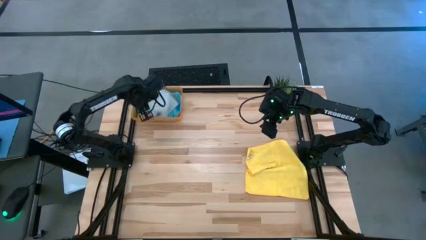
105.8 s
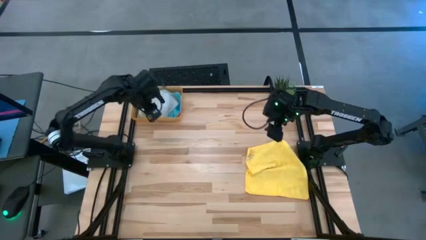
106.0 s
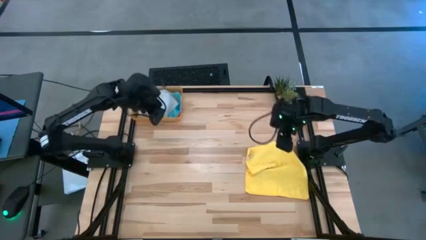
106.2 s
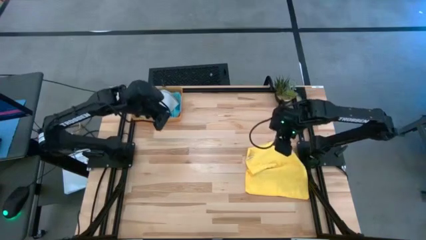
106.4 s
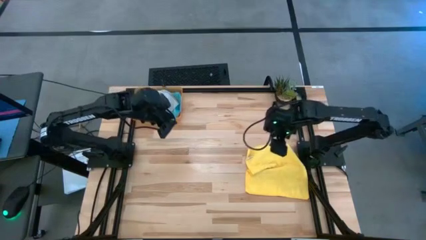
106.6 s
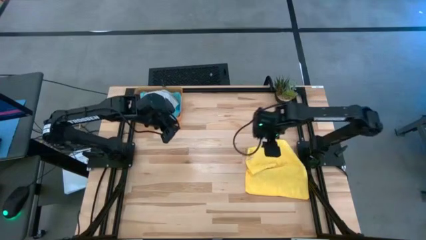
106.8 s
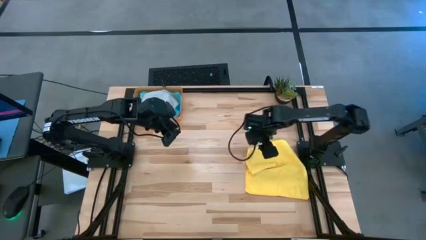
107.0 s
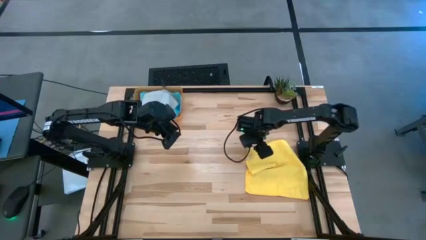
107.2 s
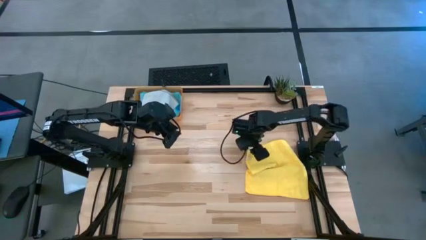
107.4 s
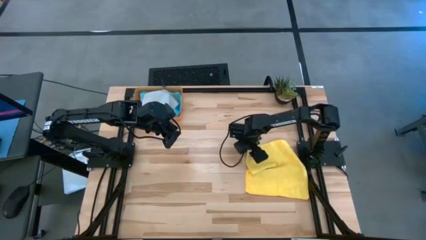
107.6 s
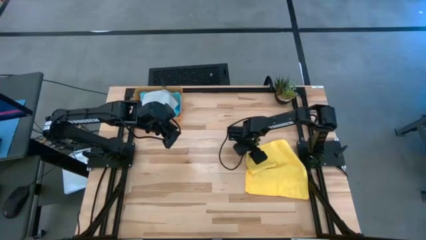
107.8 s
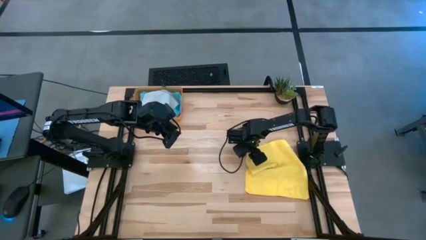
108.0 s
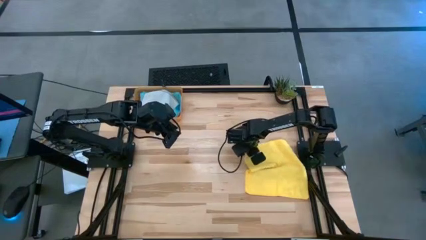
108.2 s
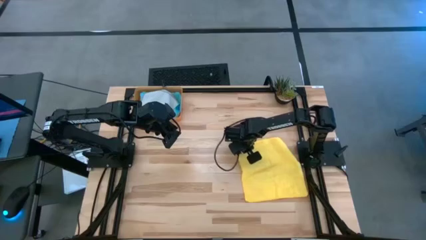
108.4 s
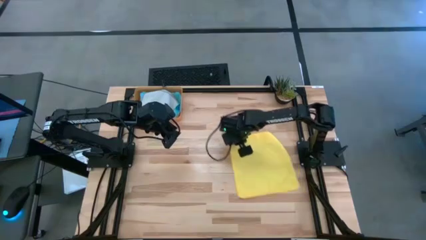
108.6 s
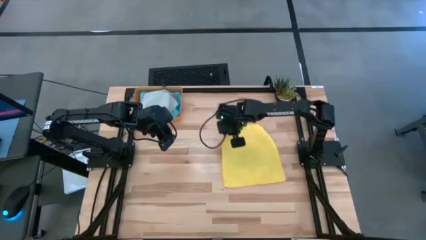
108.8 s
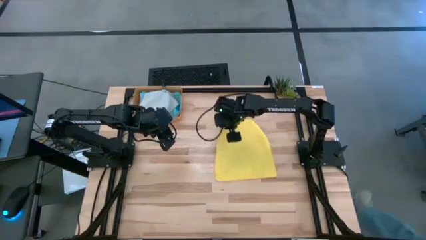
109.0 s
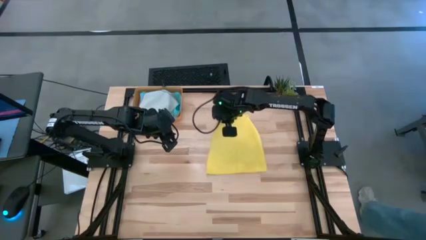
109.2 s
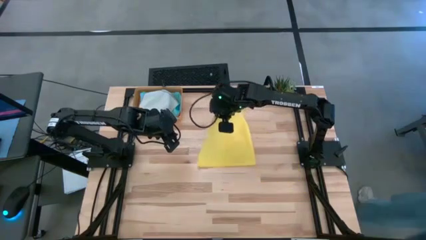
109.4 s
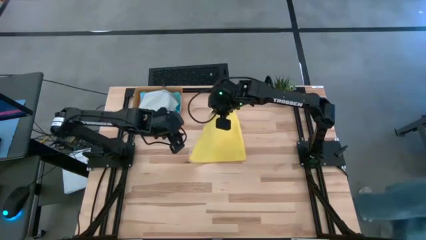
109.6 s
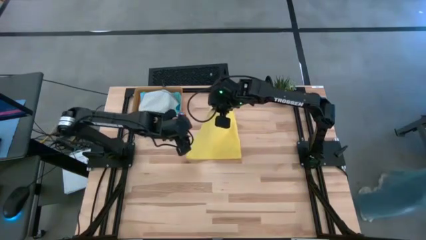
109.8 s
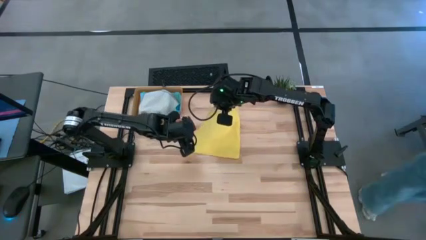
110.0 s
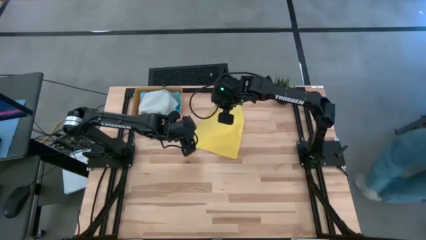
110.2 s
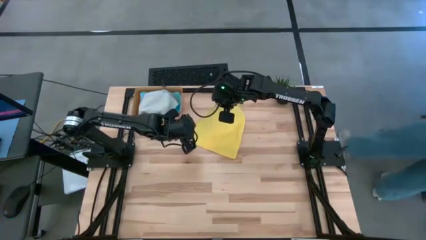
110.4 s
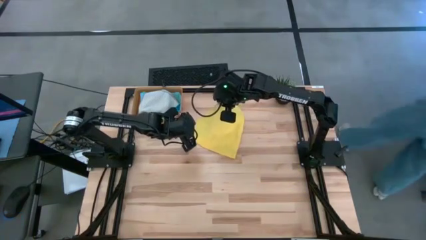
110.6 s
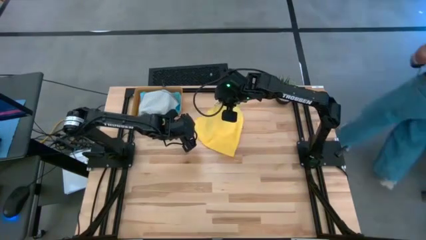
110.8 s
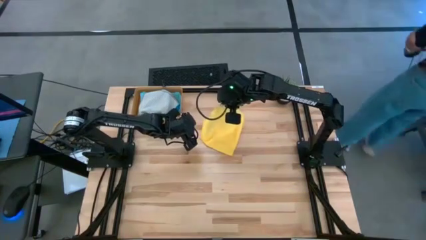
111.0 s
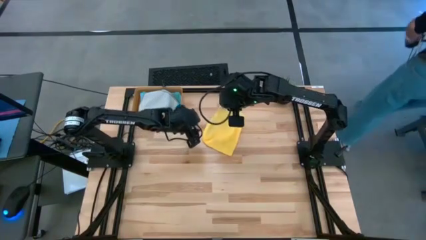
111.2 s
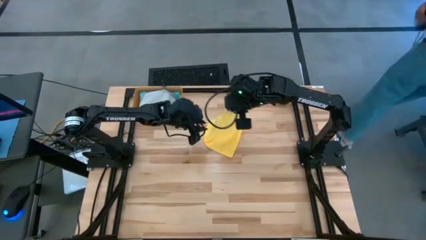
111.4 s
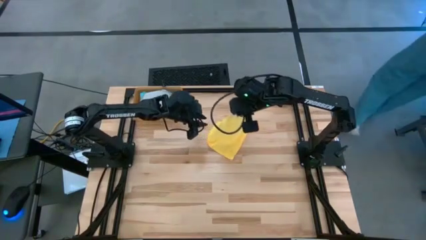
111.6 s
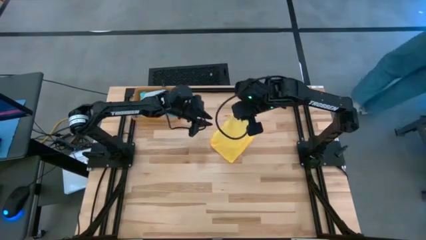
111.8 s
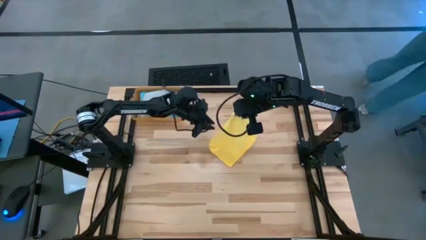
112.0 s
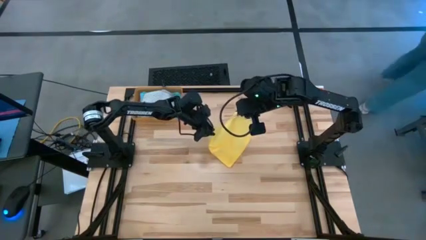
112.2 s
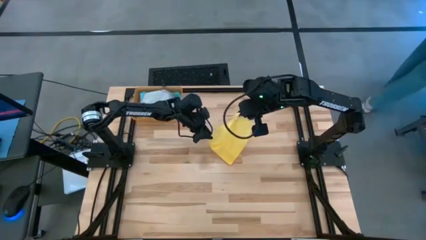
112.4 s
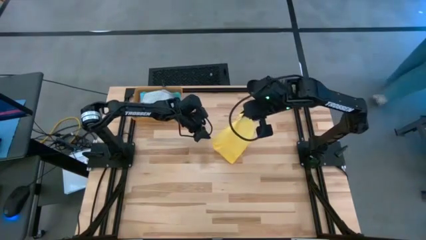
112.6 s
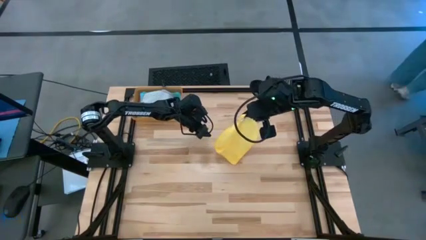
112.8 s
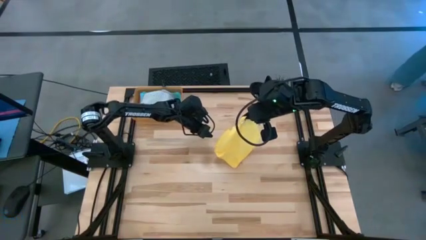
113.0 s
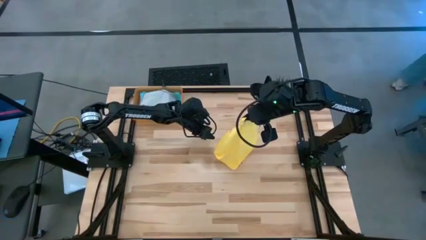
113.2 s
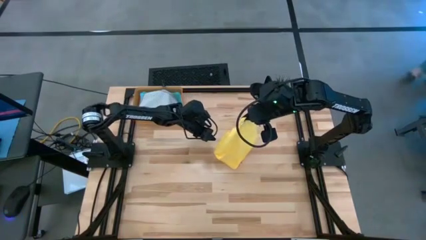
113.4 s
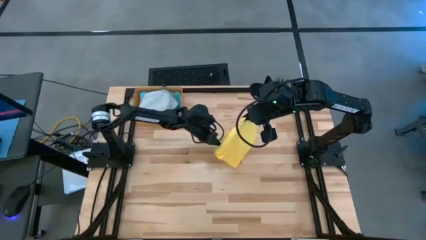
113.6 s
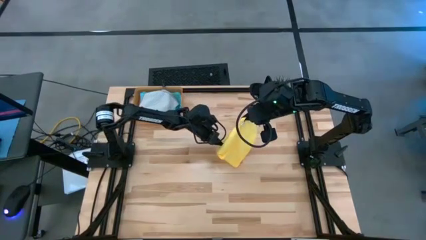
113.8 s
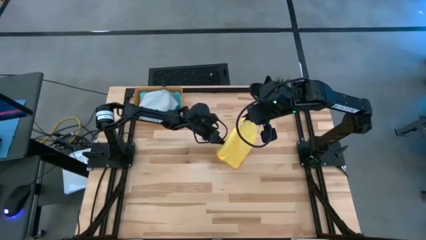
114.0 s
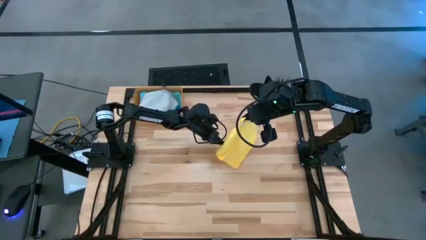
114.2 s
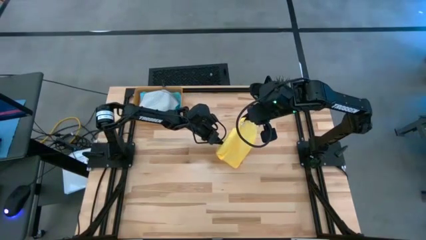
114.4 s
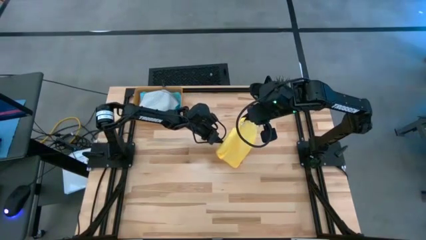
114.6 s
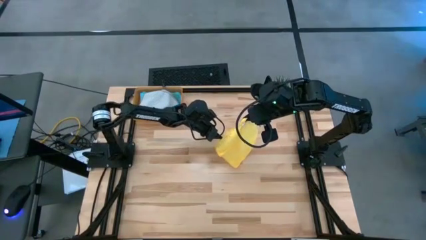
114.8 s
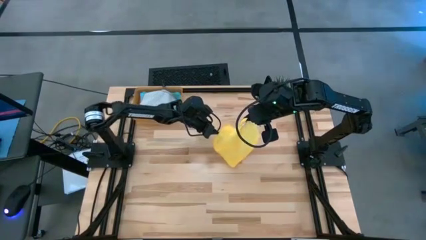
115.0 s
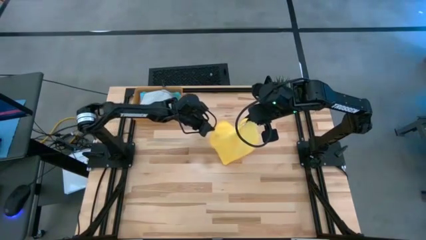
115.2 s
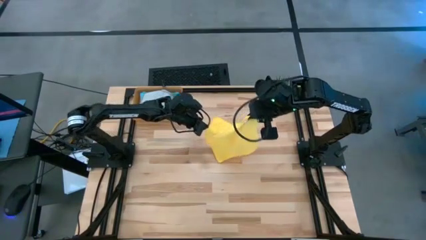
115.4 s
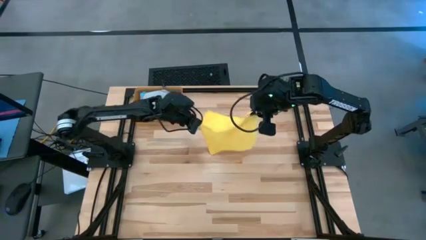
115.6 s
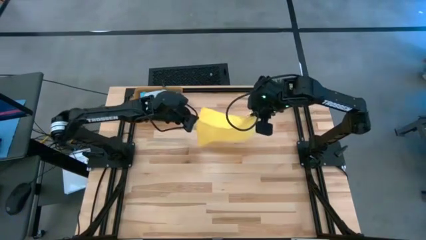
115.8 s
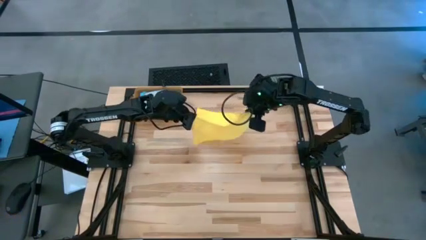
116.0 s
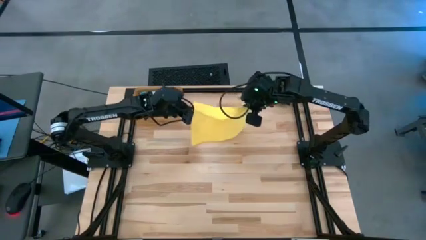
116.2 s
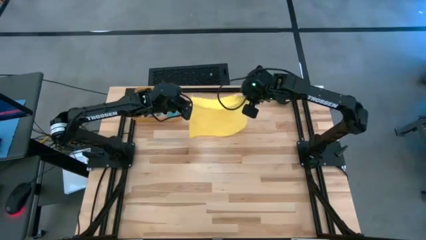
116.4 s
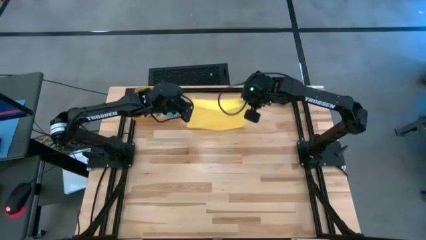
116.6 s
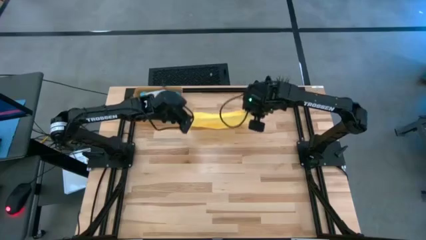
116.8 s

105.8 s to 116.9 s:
Task: Fold microfiber towels
Fold the yellow microfiber towel

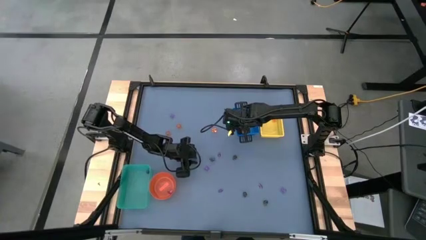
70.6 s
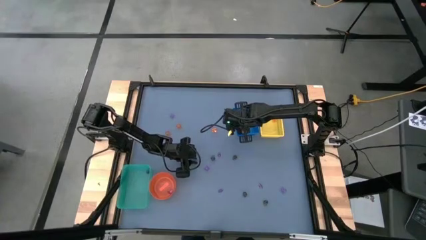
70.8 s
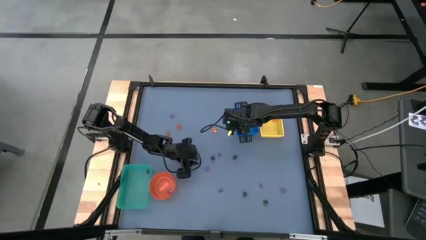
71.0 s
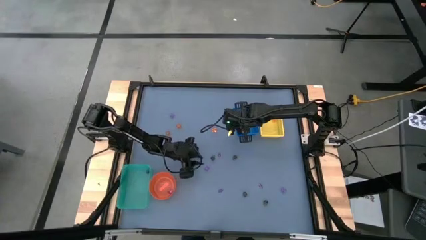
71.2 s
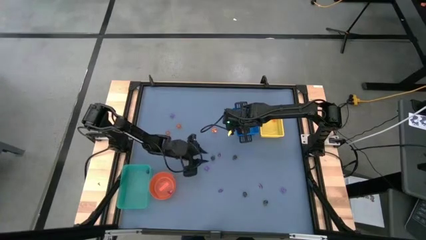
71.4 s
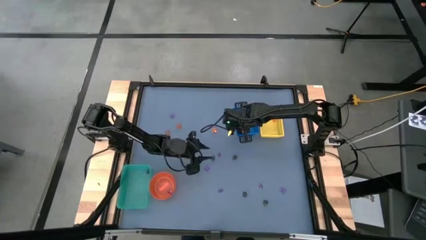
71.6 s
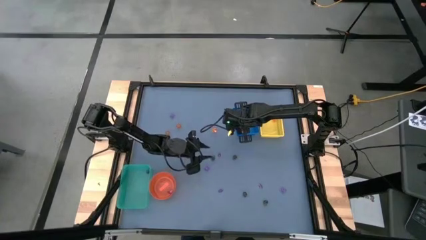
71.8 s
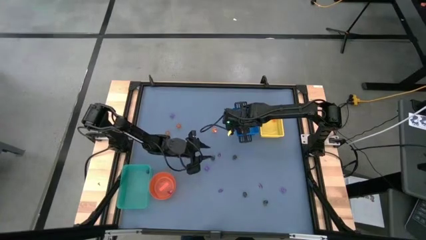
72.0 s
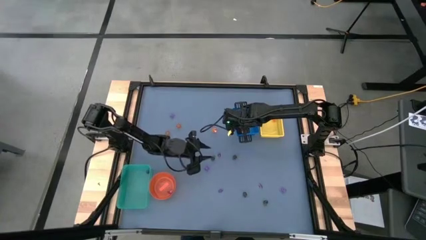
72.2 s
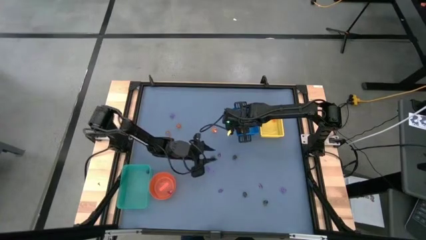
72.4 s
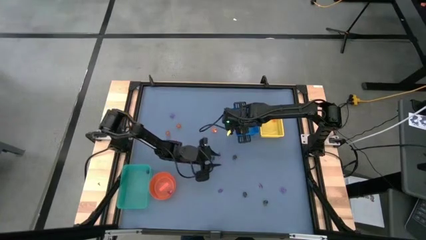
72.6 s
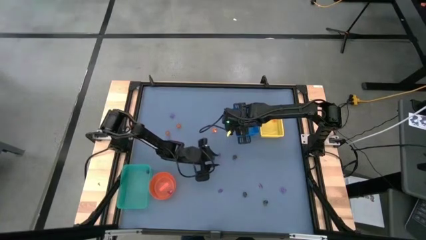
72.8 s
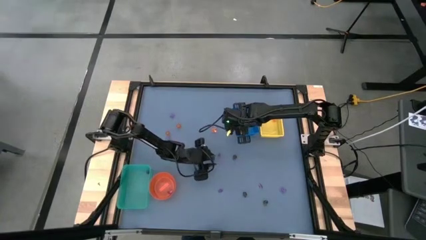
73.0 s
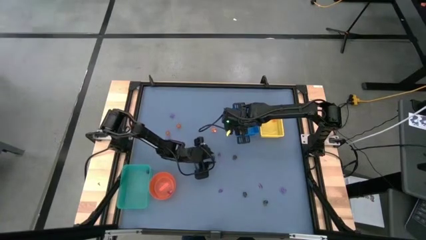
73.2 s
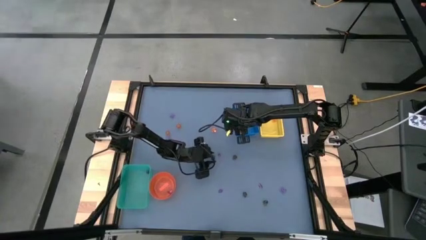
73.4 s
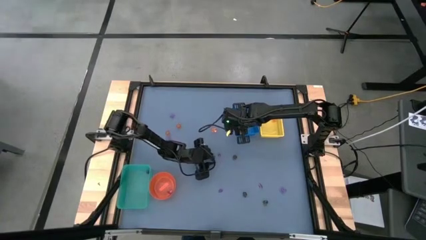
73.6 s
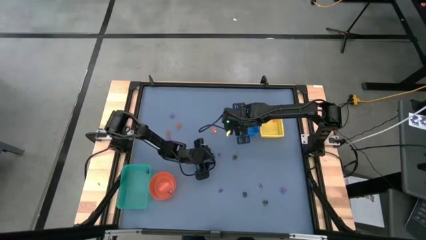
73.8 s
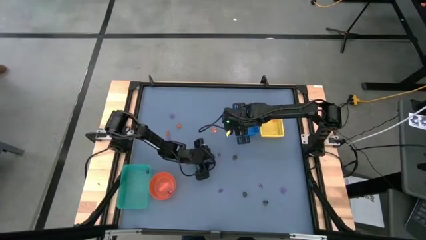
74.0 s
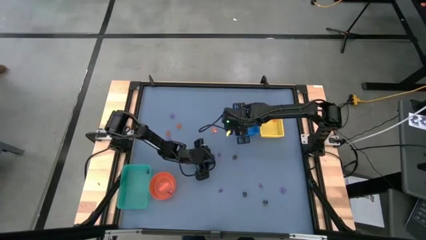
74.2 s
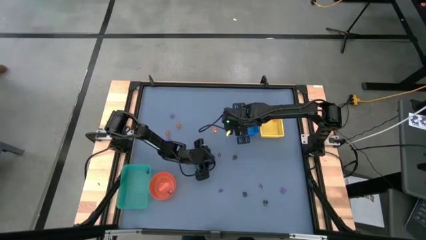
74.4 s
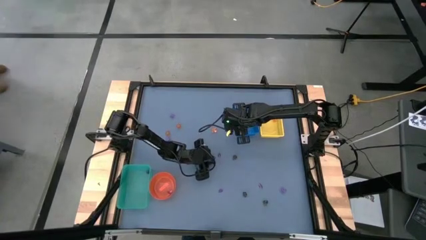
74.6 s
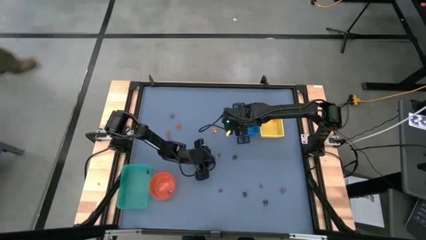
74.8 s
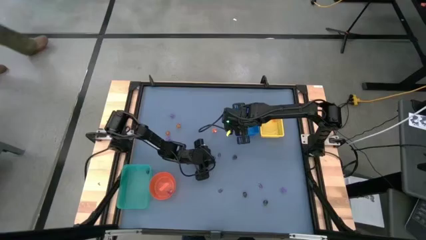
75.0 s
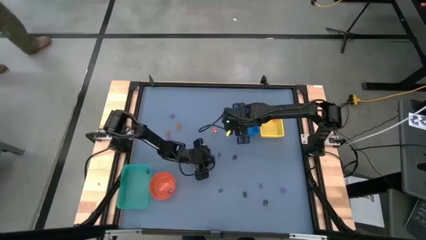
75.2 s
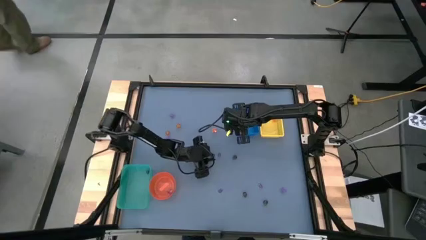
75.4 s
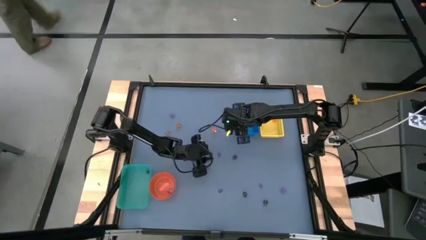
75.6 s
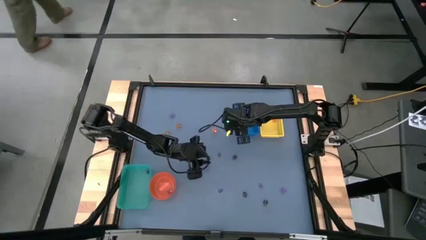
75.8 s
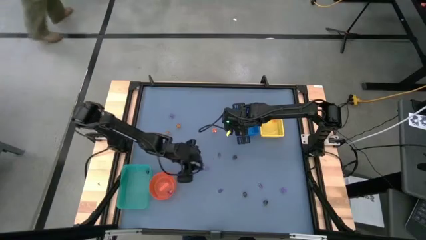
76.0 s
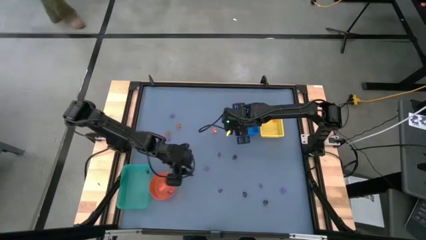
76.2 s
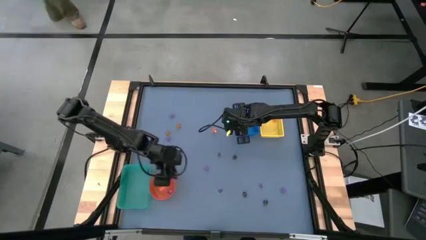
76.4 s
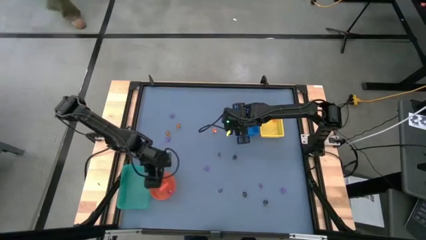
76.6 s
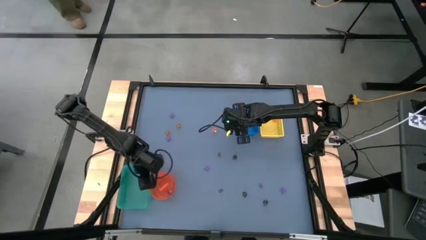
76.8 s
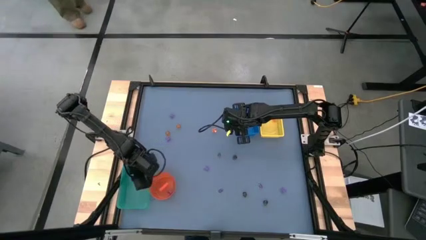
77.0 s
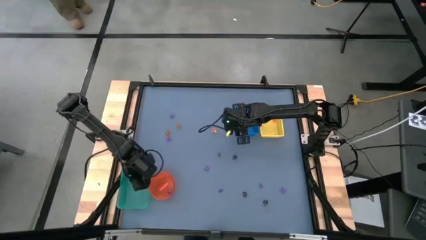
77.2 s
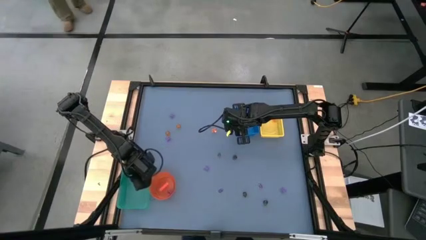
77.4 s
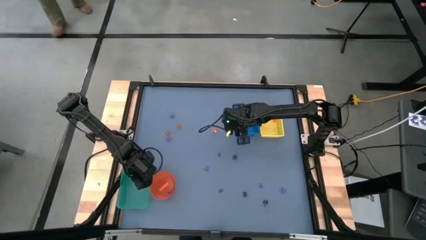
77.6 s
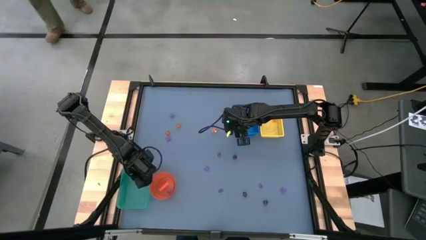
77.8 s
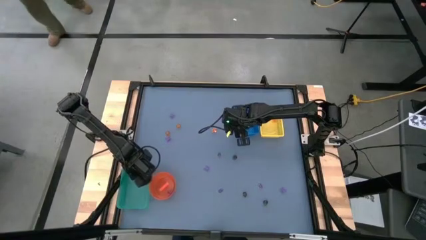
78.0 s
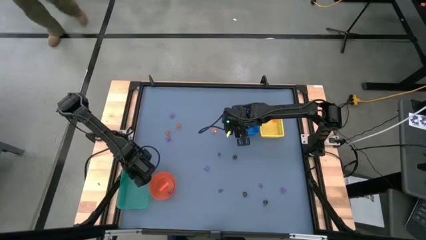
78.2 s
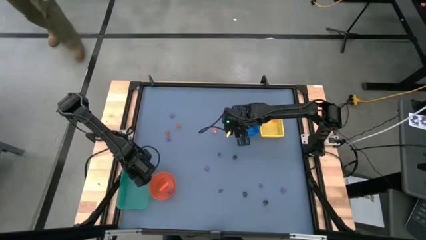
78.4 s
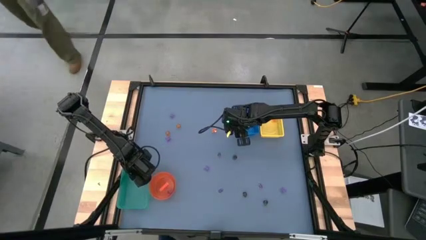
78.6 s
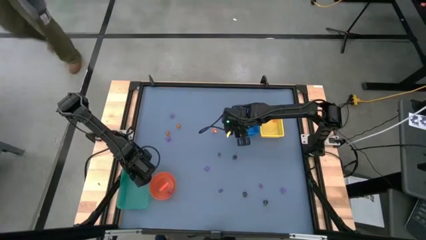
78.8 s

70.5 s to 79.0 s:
Task: Sort Halloween decoration
Put the brown skull toy into the green bin
